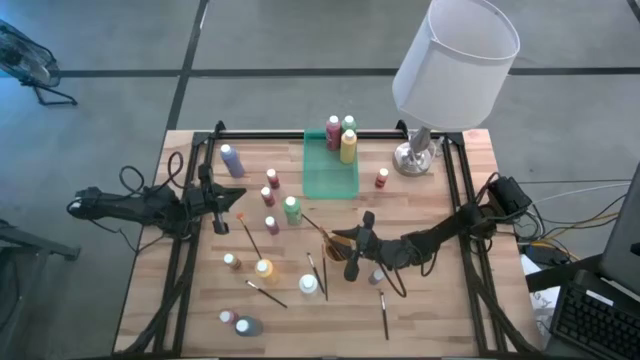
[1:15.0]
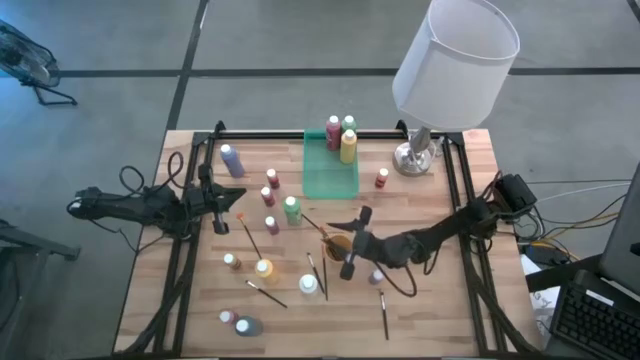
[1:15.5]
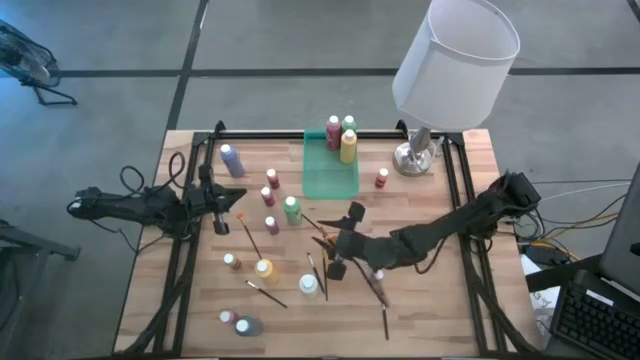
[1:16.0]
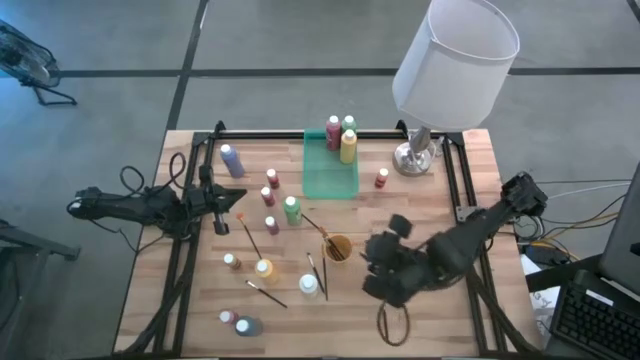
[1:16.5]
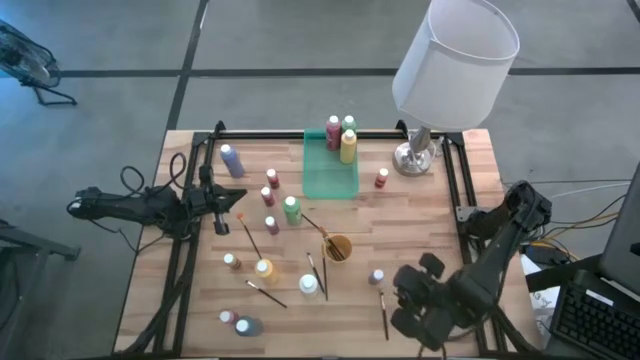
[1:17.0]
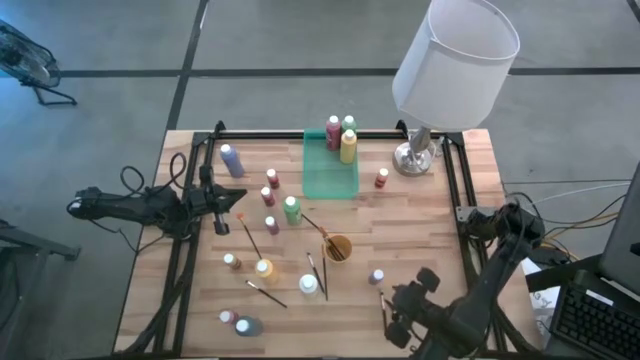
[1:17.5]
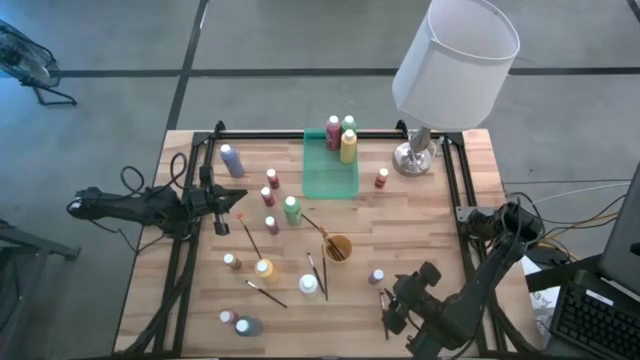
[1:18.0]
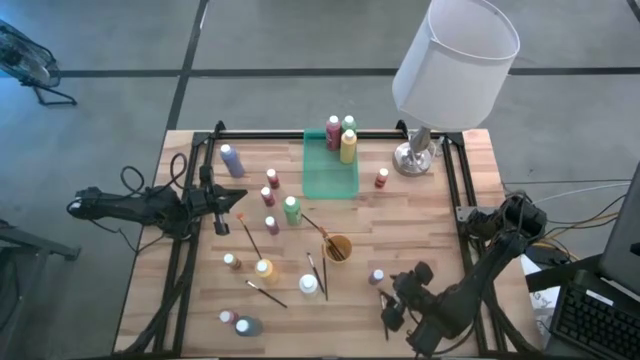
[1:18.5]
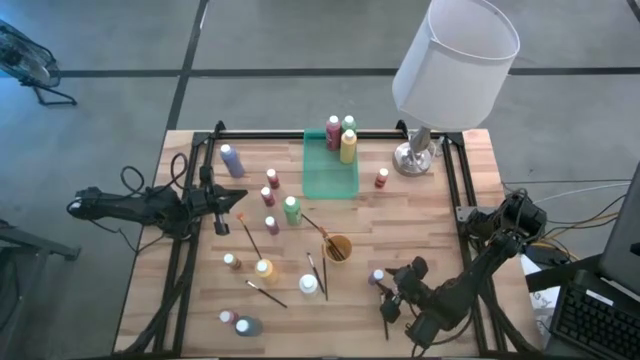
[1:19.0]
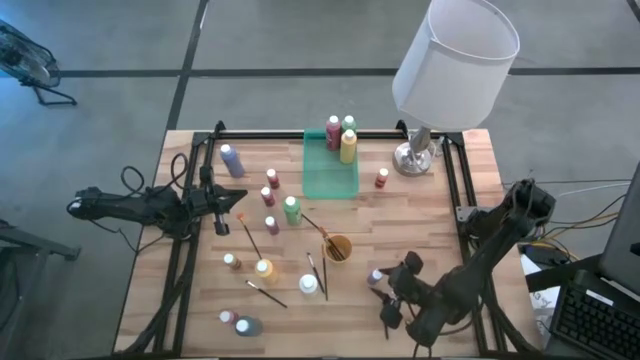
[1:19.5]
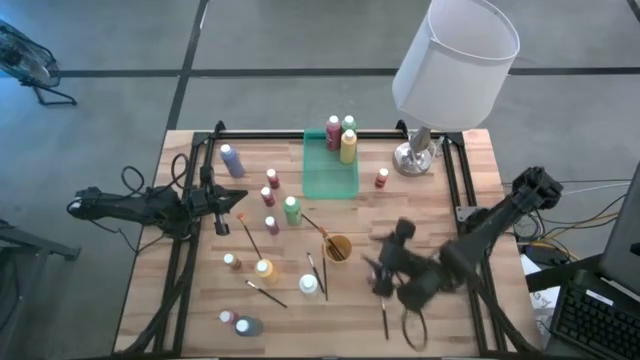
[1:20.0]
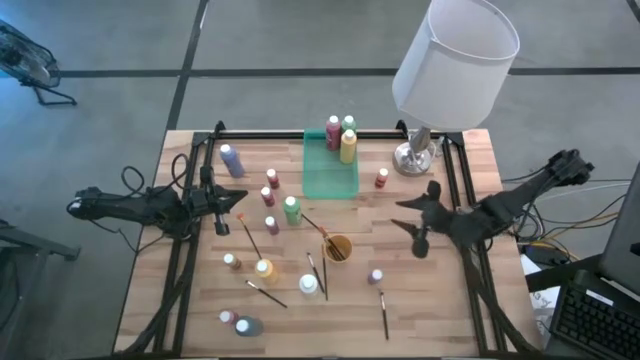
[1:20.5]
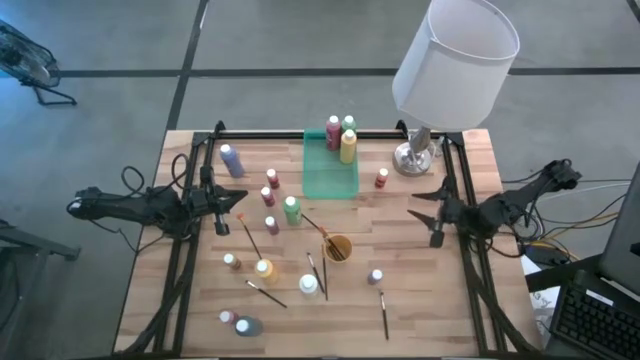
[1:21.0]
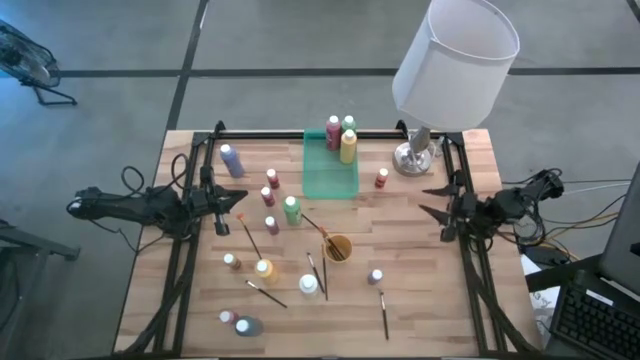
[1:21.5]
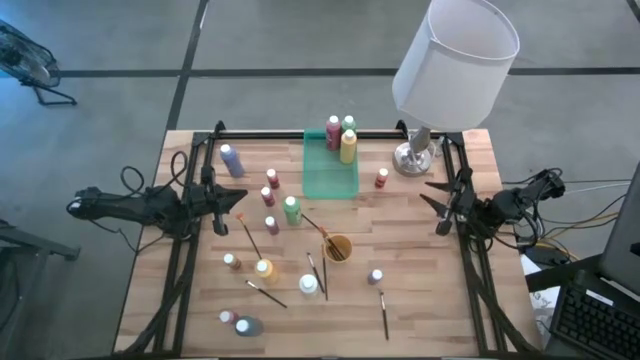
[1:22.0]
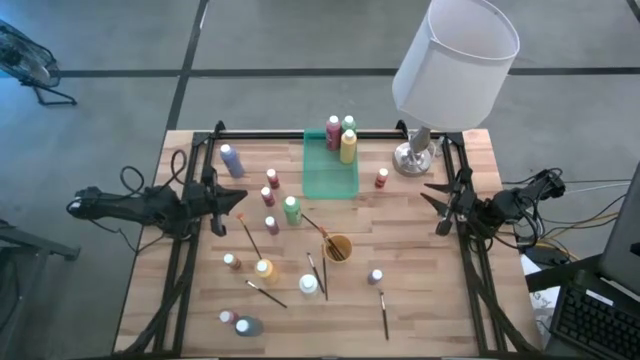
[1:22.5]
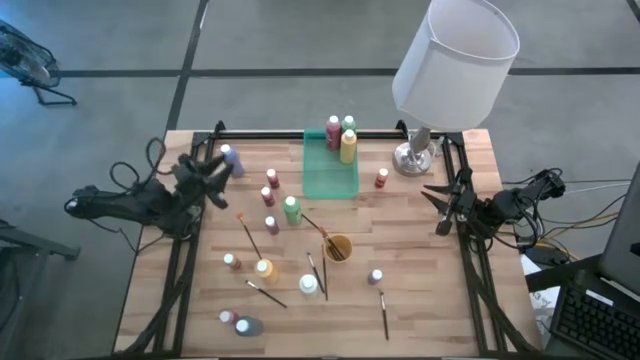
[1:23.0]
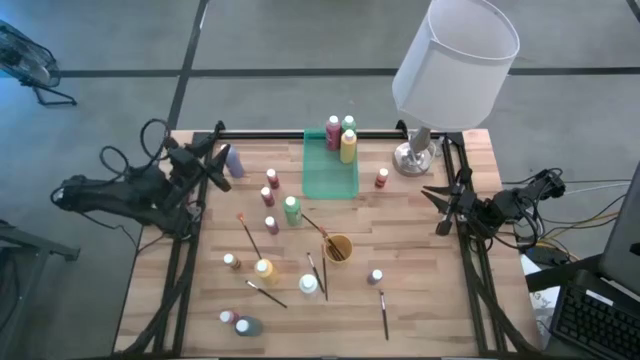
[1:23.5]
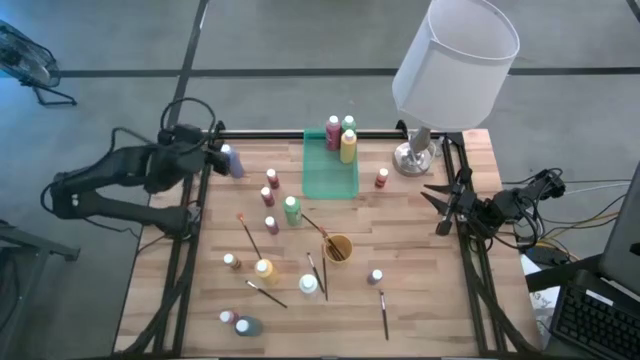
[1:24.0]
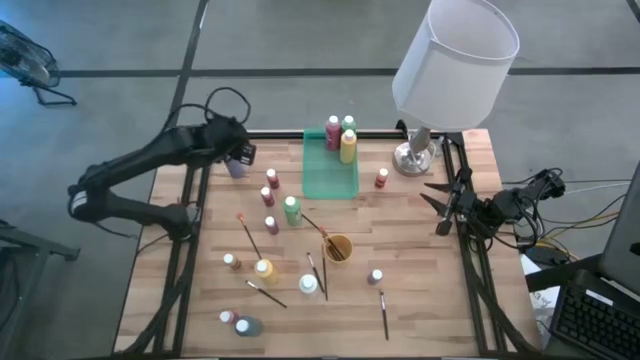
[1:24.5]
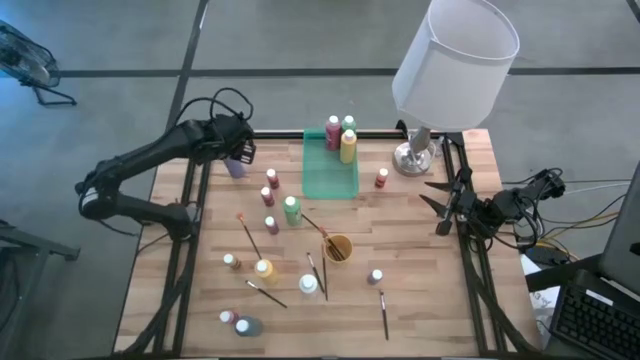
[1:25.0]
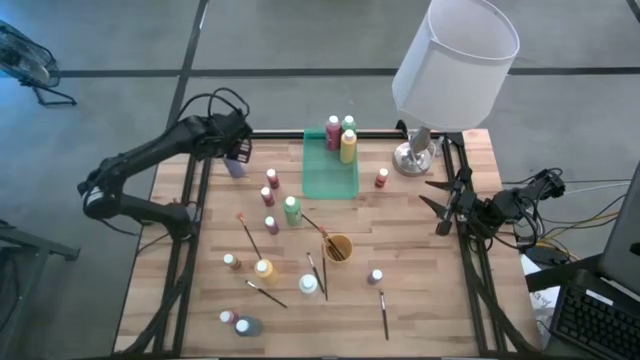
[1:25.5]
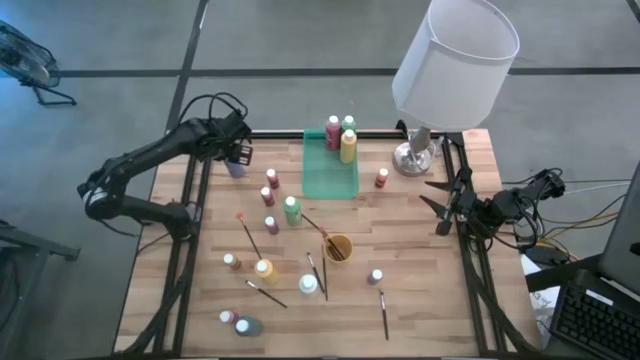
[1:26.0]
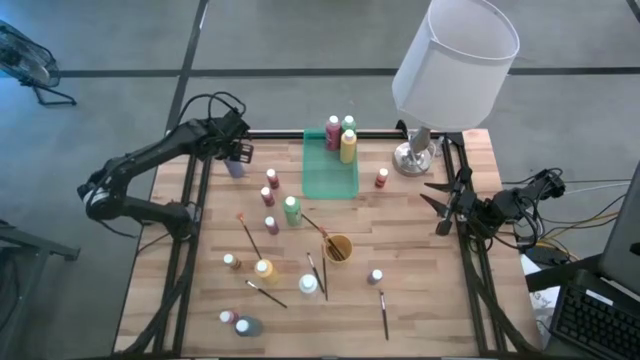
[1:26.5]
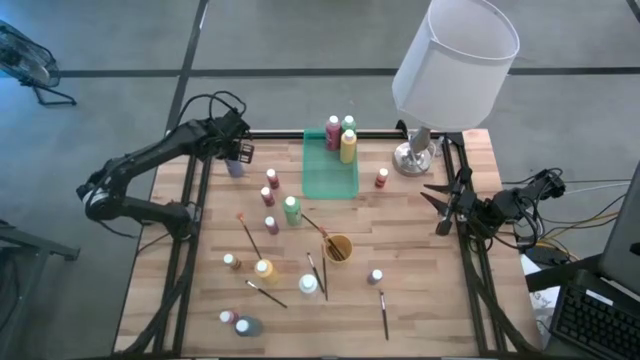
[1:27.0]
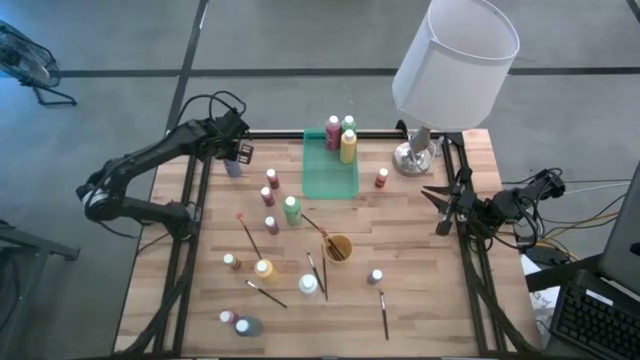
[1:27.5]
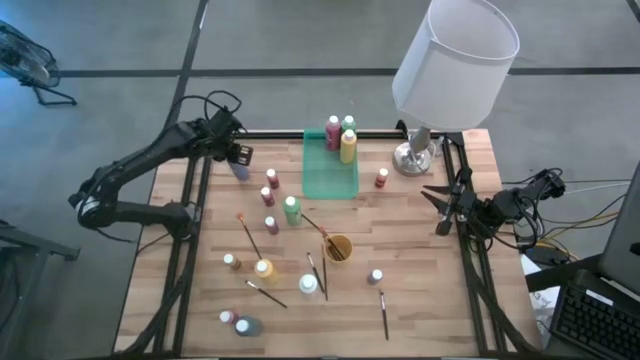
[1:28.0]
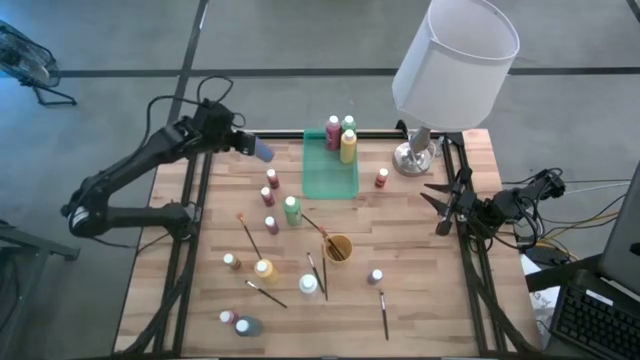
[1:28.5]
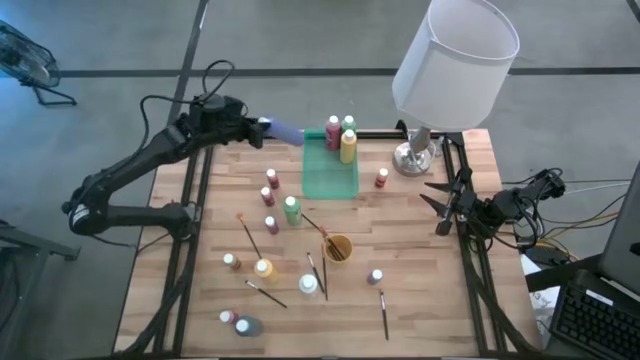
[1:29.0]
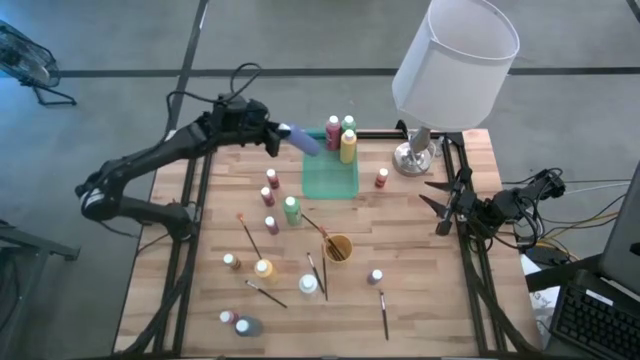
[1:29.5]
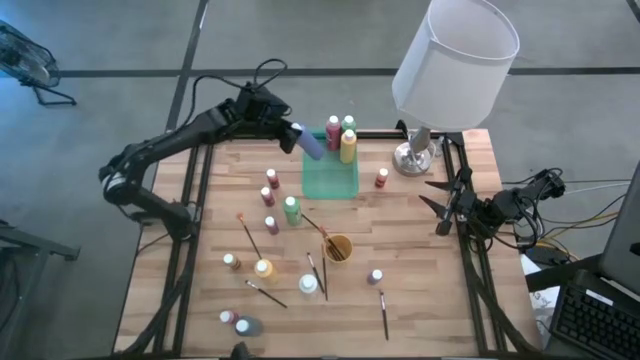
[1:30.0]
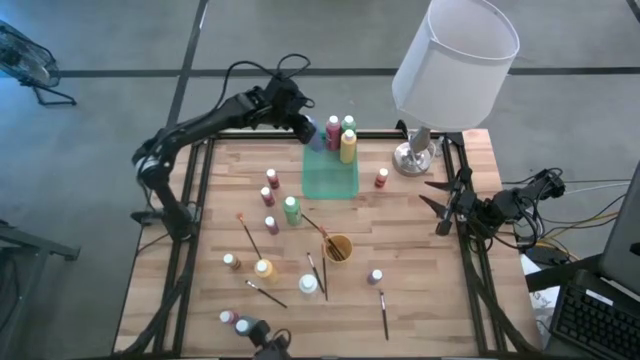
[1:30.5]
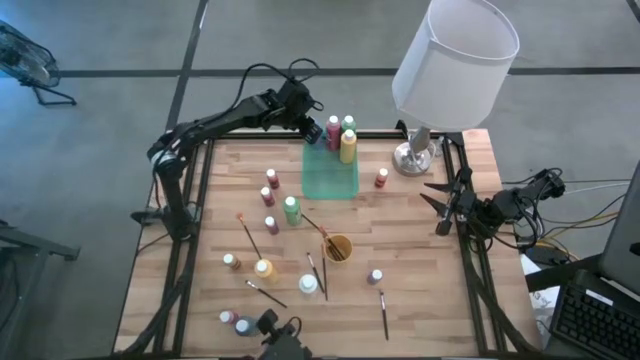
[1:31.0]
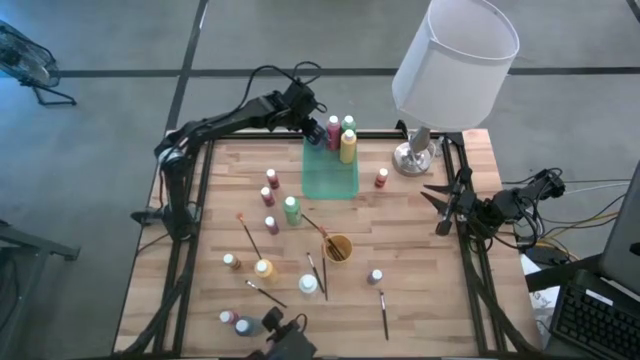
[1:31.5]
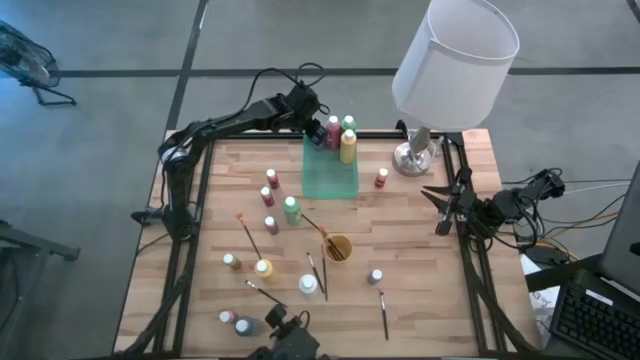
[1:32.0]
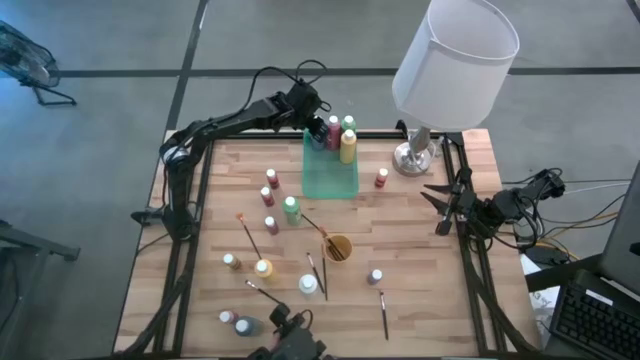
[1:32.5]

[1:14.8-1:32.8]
Task: Pick & Place Paint Supplies
Put the large purple paint bottle into the green bin

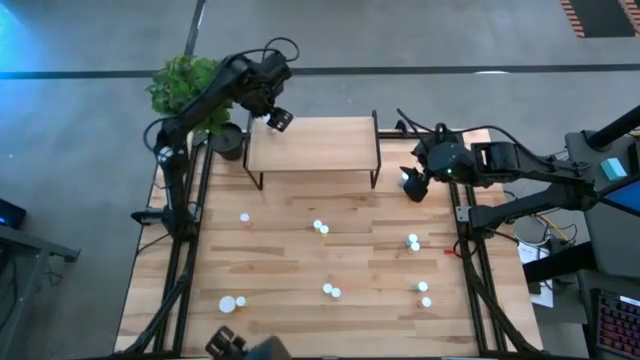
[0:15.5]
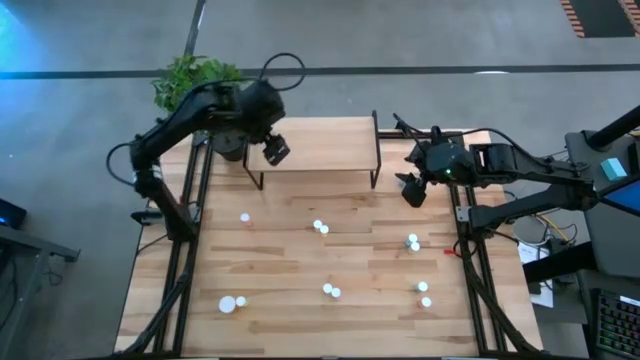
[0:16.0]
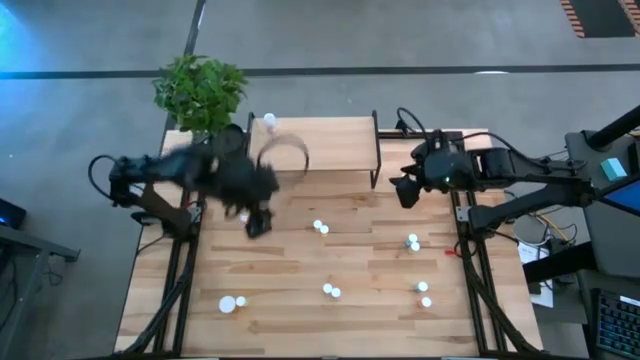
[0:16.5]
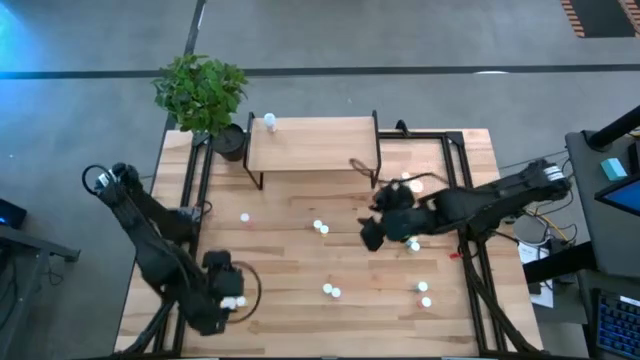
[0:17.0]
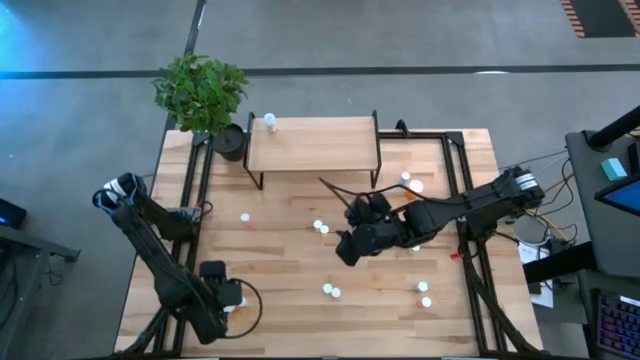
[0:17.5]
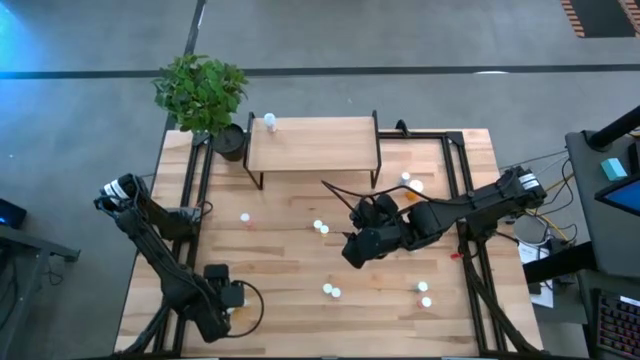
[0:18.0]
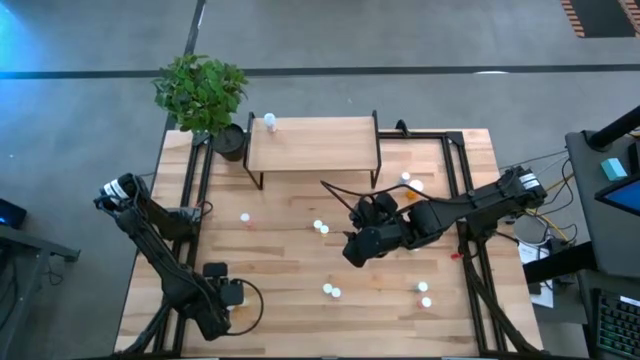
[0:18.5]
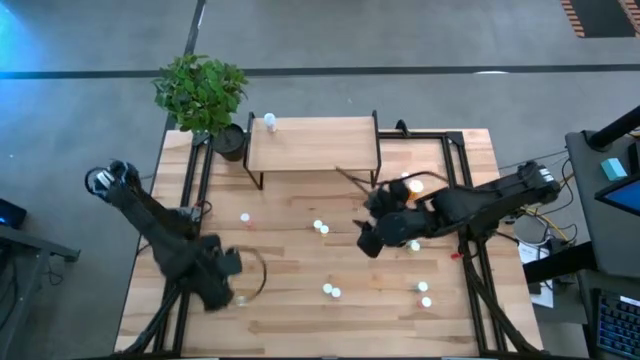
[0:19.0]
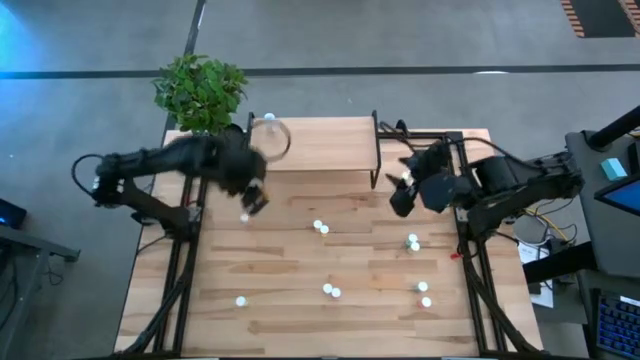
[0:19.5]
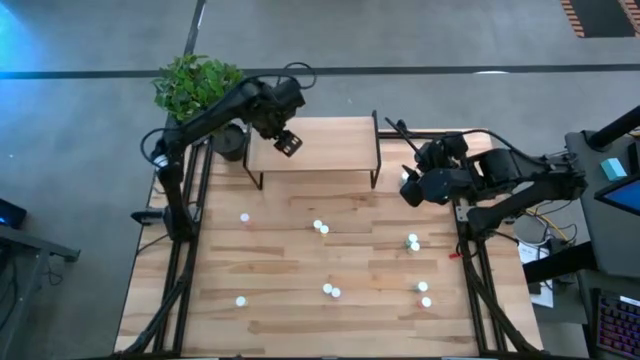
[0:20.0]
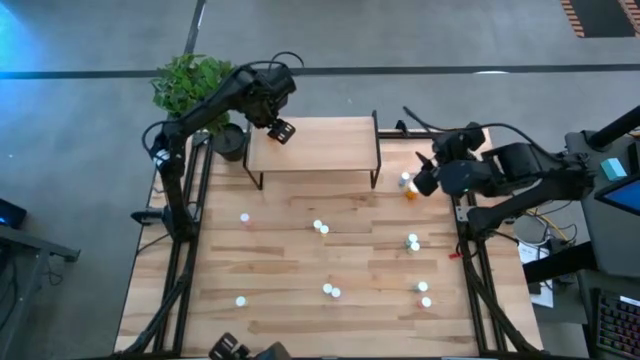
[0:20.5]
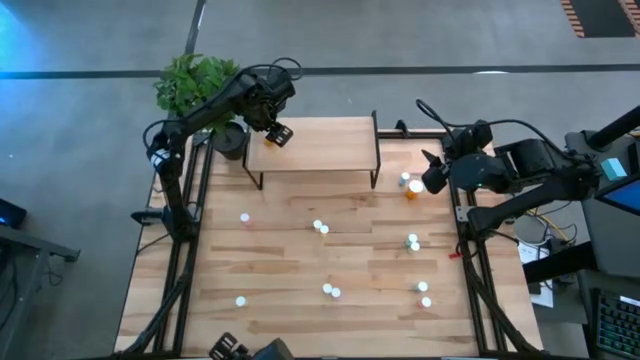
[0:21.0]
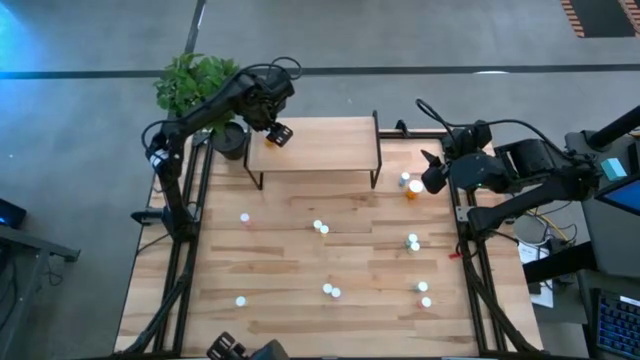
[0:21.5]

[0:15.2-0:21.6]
Task: Pick and place medicine bottles onto shelf by color
Put the orange pill bottle on the shelf
